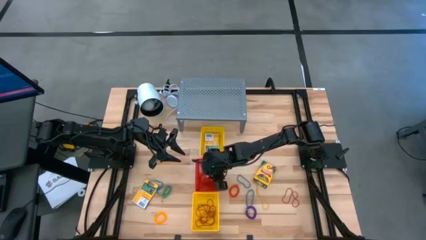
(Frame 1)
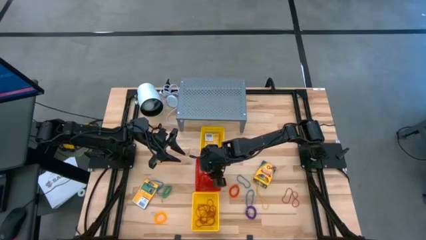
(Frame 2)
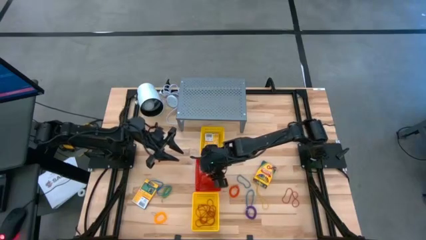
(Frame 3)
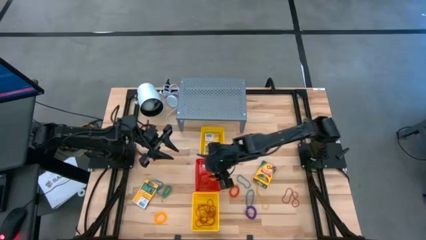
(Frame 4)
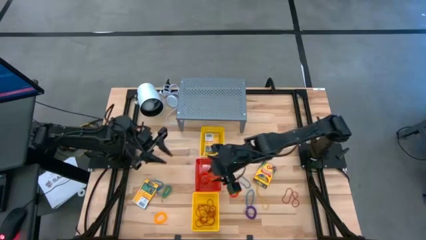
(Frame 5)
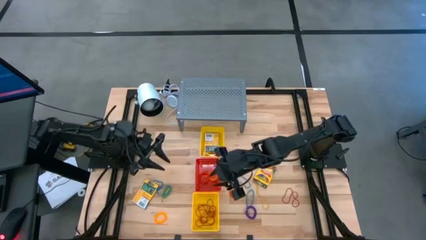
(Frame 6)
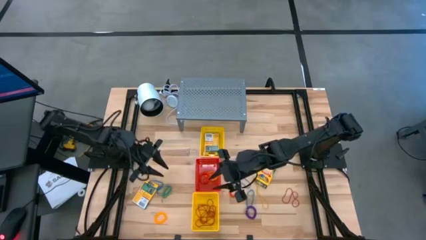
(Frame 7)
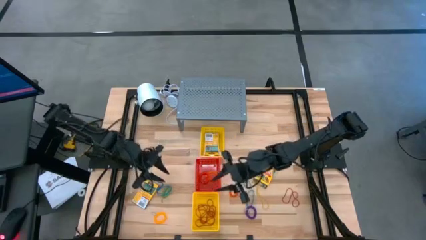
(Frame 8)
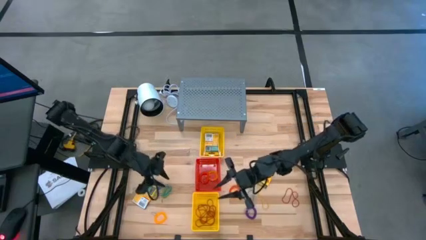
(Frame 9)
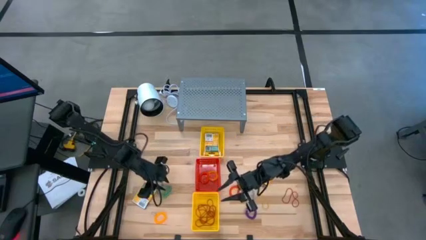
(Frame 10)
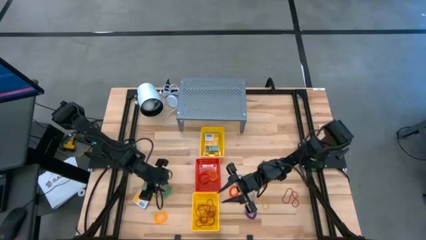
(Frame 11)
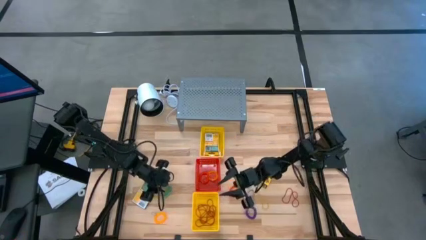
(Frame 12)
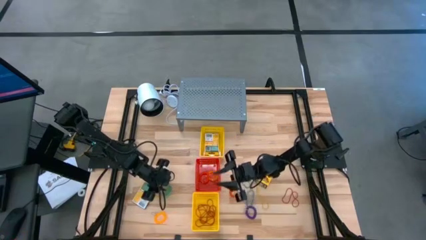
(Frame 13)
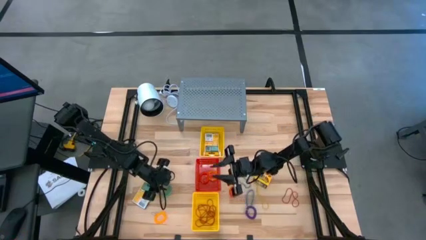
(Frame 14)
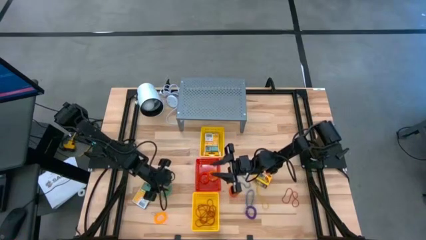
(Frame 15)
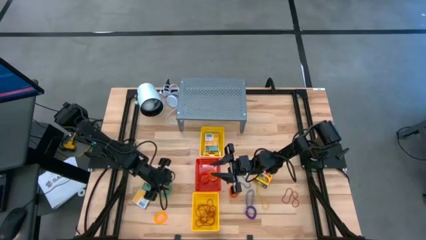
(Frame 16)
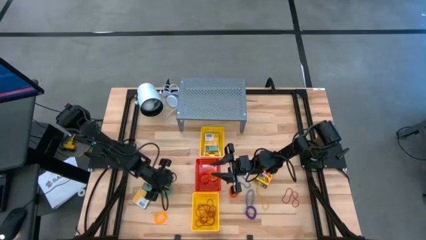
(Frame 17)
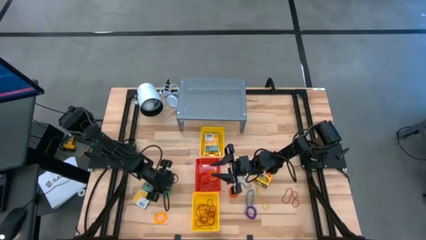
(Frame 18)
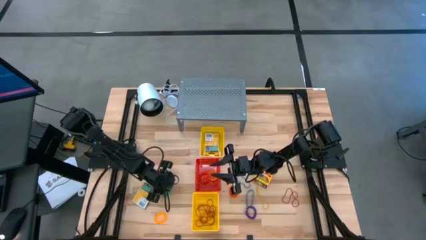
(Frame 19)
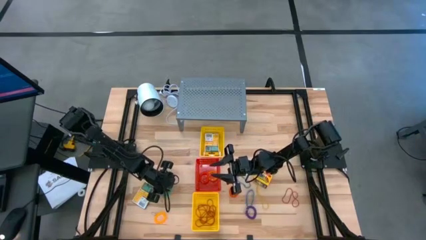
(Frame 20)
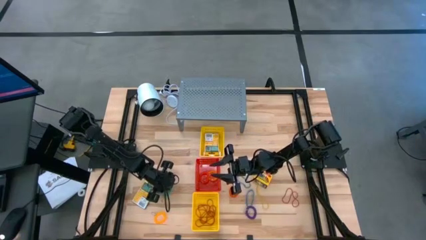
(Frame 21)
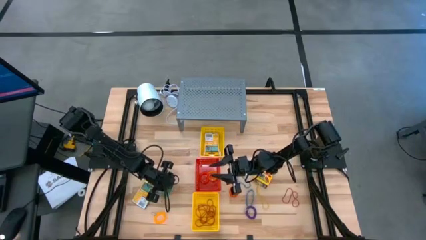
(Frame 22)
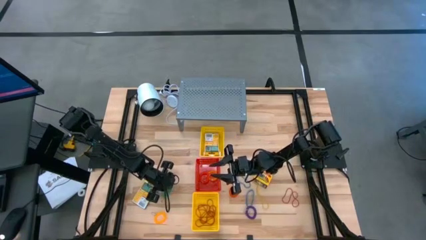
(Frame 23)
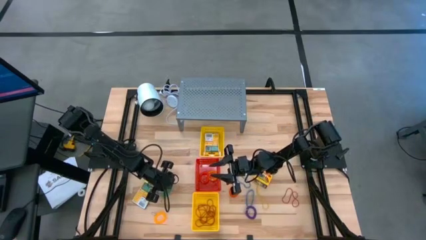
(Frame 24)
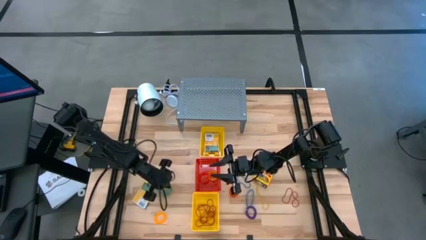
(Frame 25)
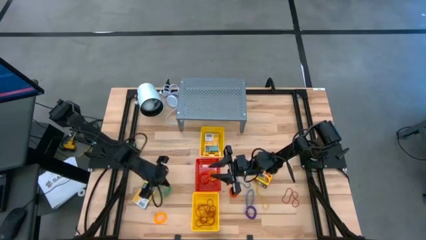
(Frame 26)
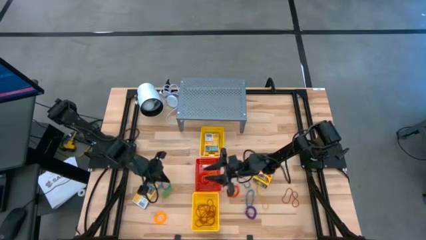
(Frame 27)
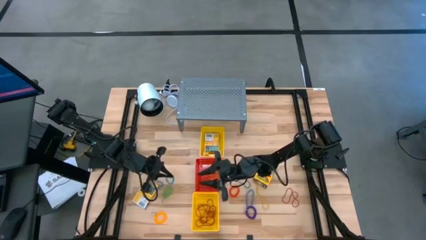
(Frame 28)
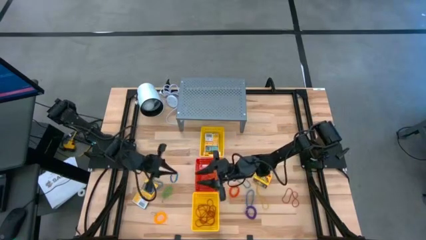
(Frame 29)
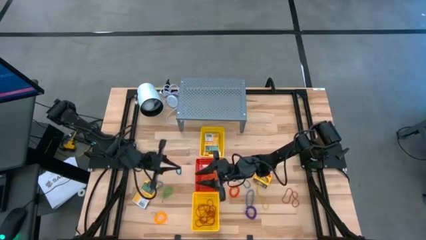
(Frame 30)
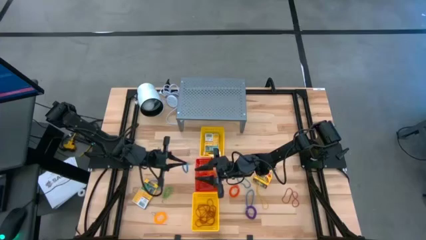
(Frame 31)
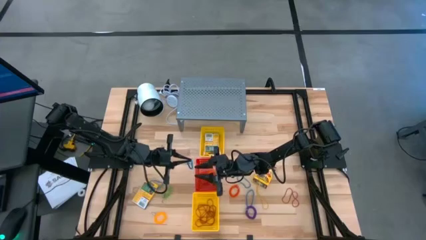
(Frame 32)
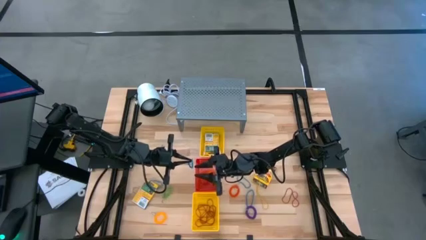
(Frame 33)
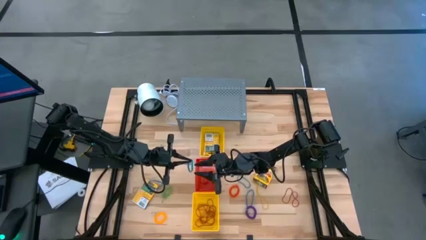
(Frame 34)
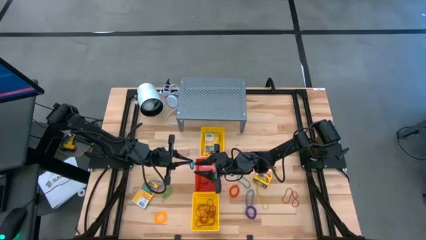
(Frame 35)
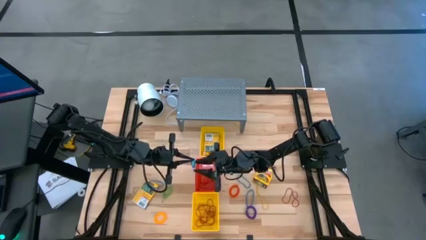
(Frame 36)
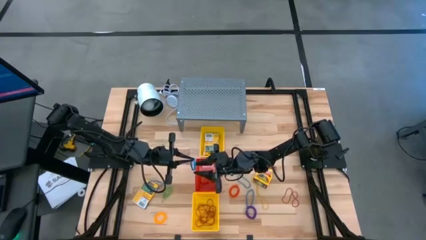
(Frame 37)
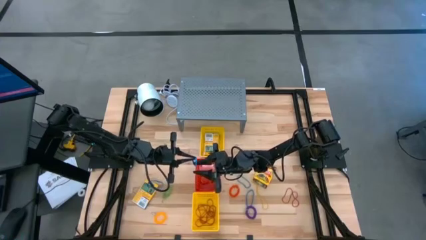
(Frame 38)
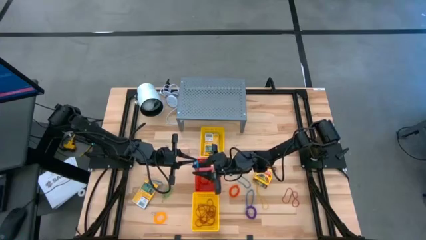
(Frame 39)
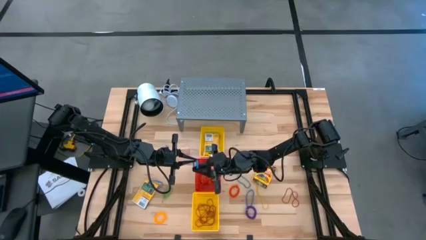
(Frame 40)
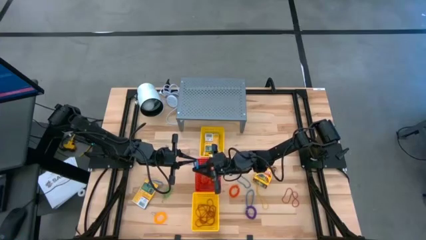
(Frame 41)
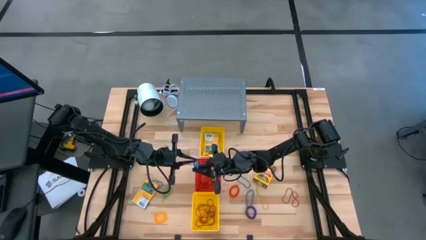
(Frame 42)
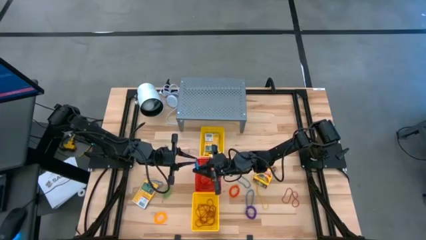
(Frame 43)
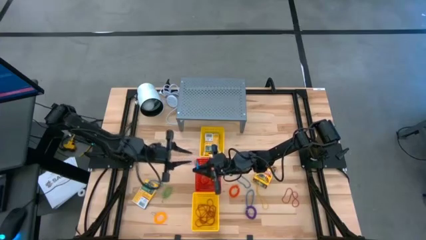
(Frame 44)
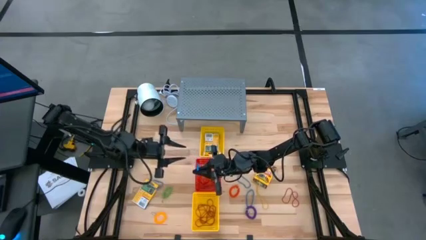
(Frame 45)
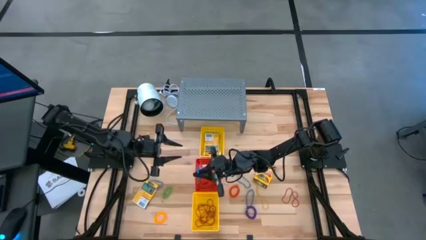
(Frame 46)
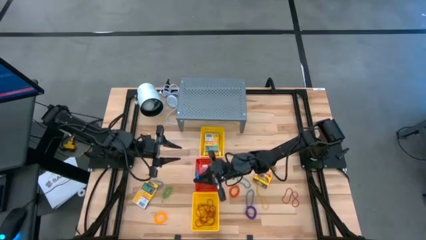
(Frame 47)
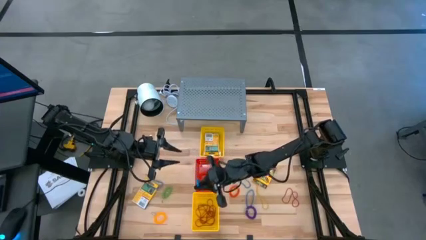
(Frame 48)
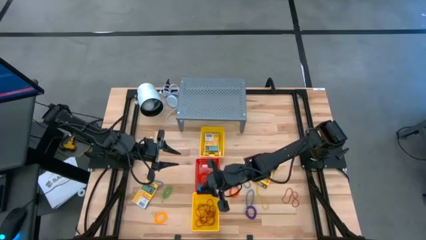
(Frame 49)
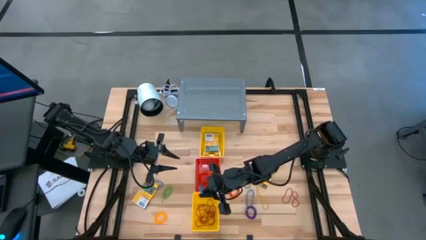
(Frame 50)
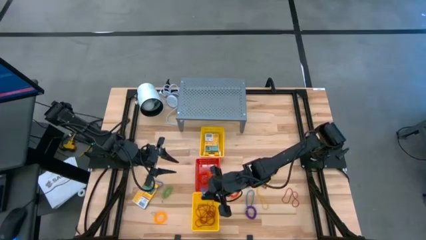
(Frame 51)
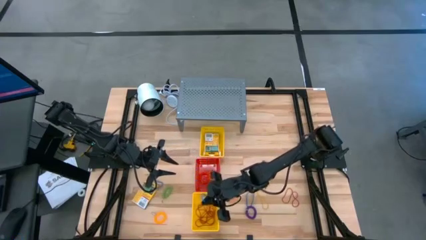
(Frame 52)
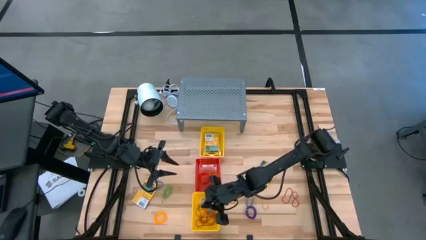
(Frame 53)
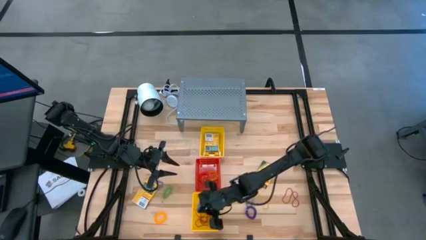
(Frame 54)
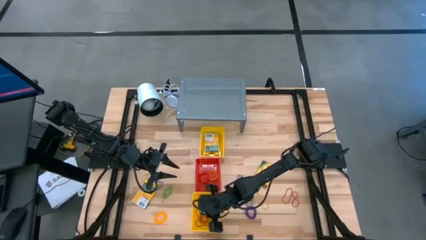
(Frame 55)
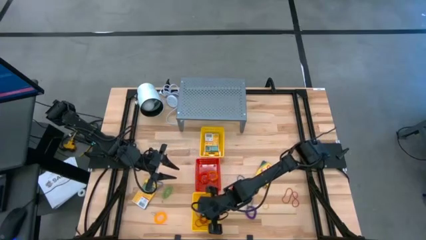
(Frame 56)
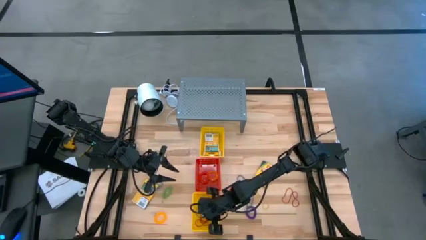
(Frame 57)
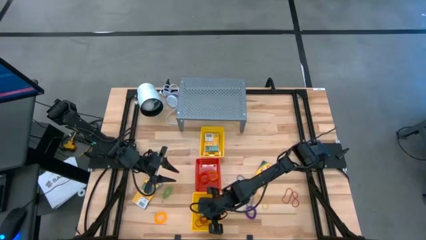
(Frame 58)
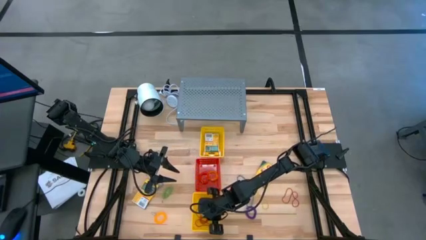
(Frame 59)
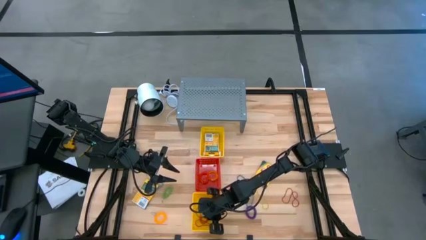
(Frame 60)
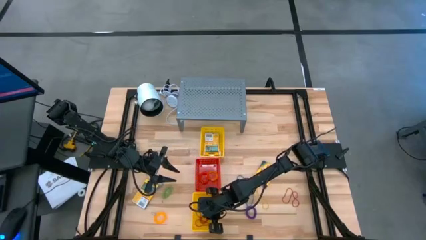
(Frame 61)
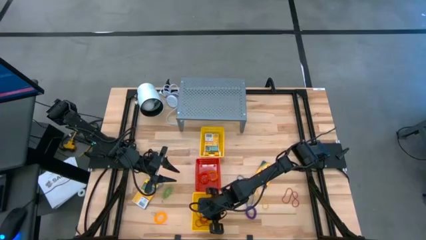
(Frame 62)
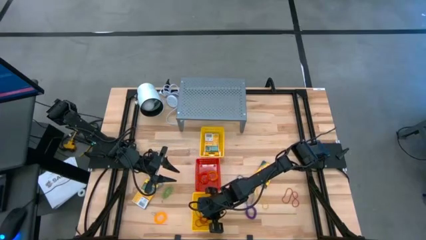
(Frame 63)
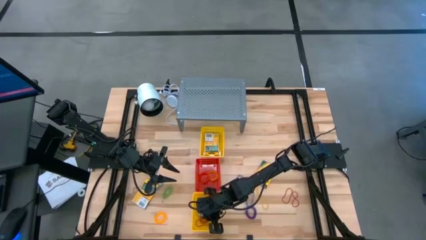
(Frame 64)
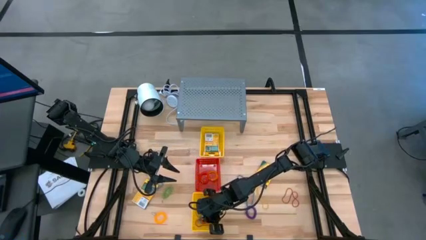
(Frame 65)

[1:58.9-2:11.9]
Task: Pick & Place Office Desk Supplies
Put the blue rubber band into the bottom yellow bin

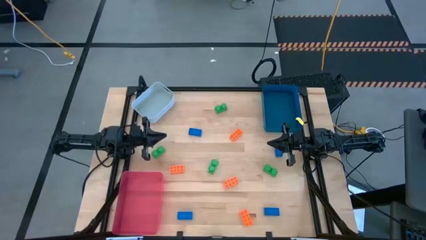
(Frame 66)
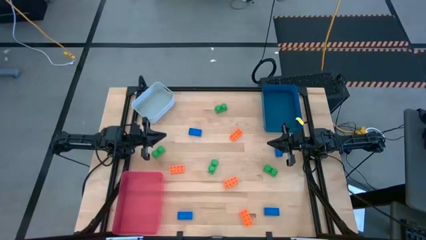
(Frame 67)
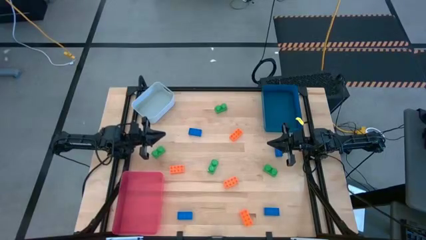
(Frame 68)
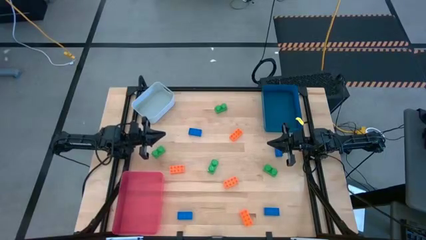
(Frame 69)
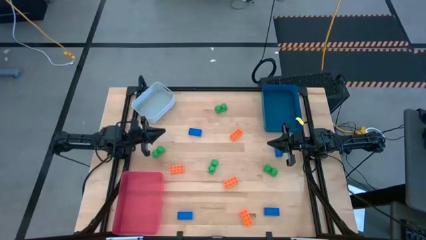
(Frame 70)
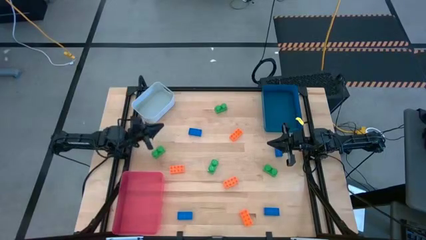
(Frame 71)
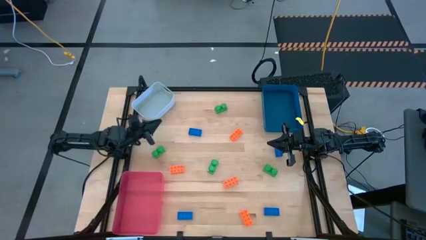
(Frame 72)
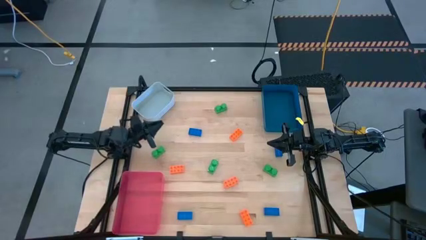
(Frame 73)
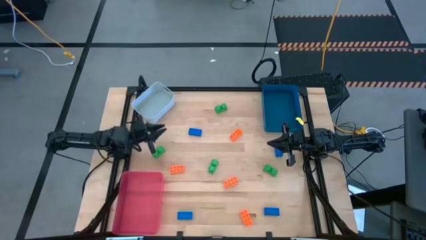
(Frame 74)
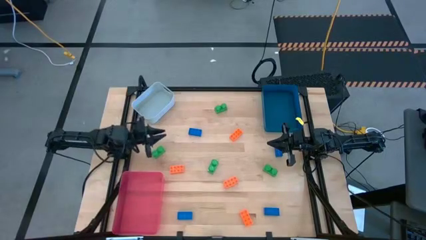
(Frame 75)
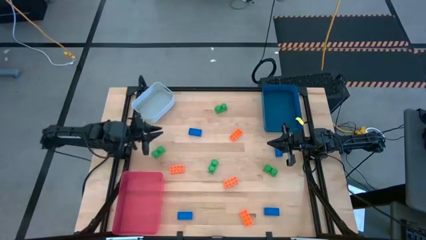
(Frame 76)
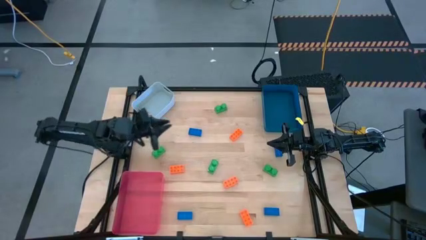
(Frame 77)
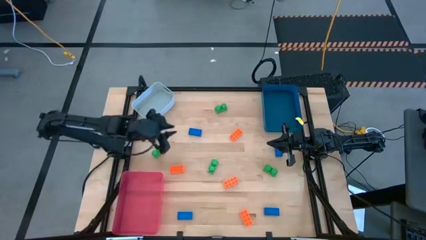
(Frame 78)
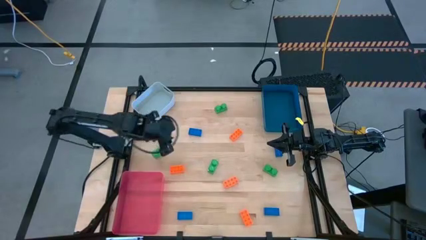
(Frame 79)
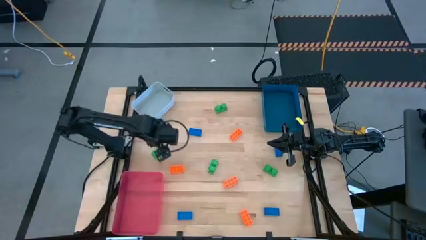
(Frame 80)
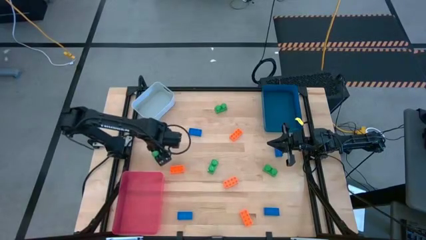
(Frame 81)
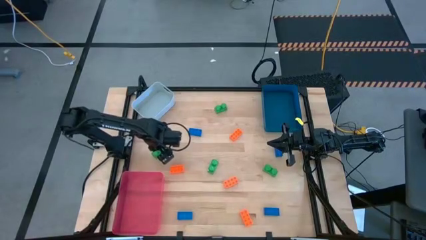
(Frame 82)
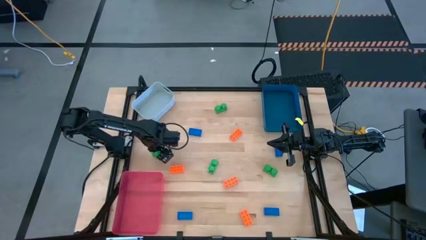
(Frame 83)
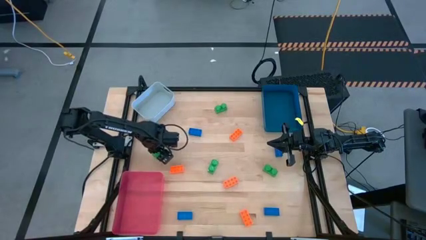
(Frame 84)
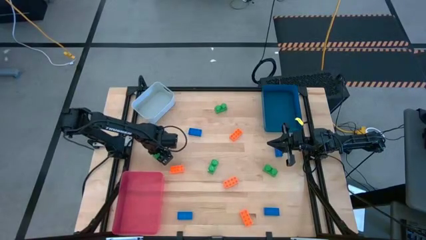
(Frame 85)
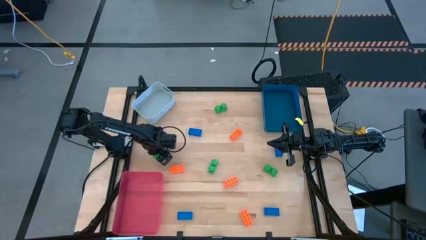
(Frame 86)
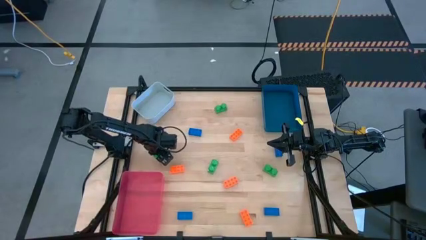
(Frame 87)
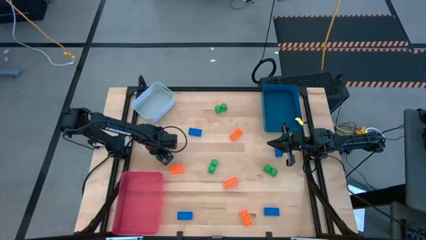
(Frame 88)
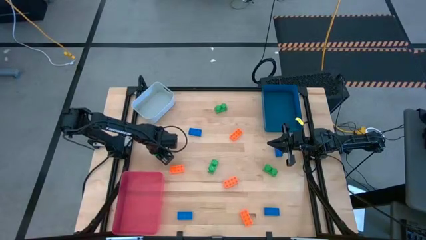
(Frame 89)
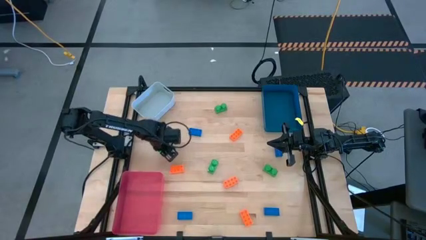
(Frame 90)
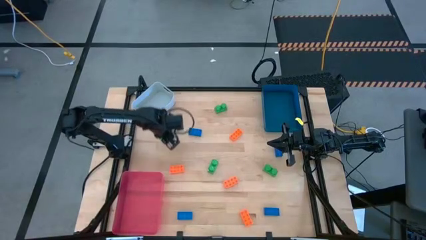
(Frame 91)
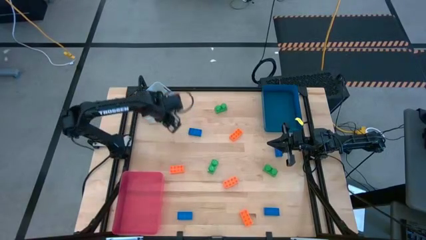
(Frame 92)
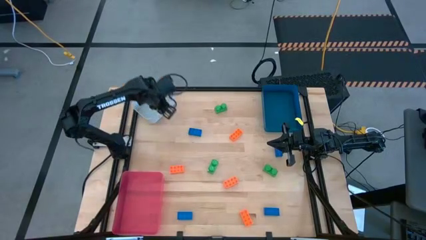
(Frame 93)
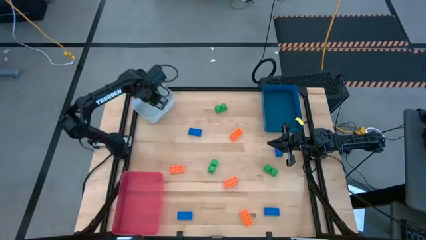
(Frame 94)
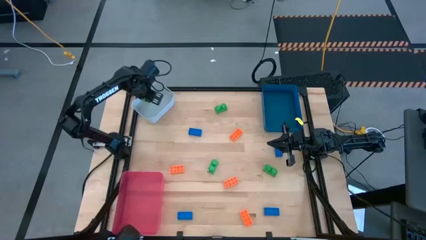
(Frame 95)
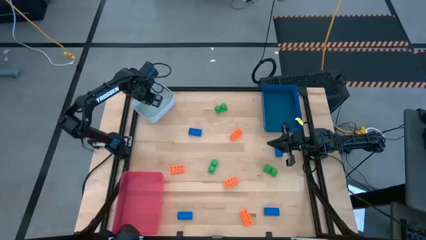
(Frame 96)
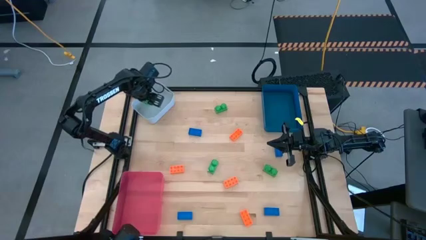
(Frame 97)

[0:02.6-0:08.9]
Task: Sort & place blocks by color
Put the green game piece into the gray bin
